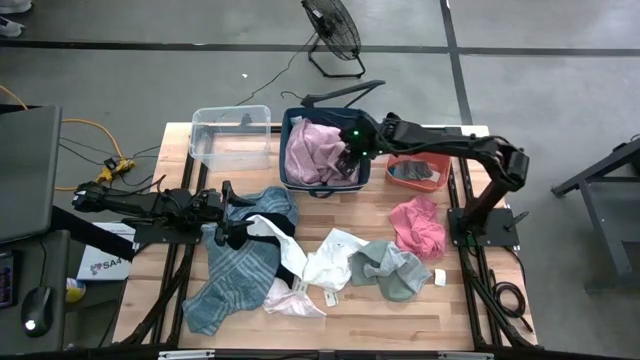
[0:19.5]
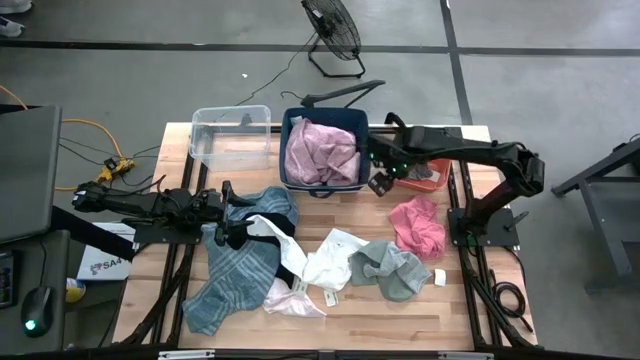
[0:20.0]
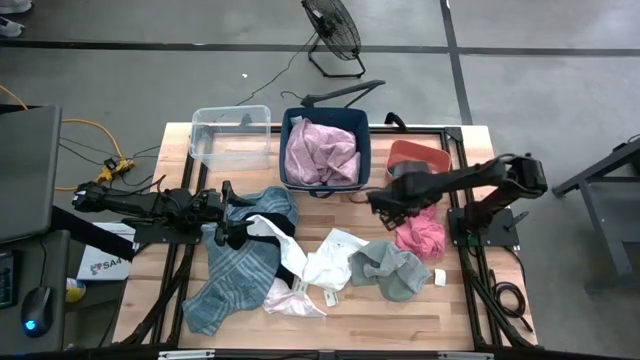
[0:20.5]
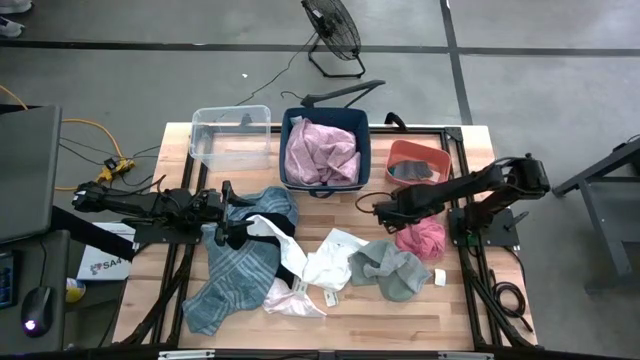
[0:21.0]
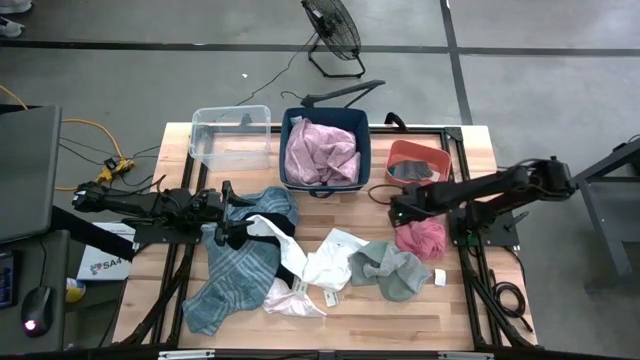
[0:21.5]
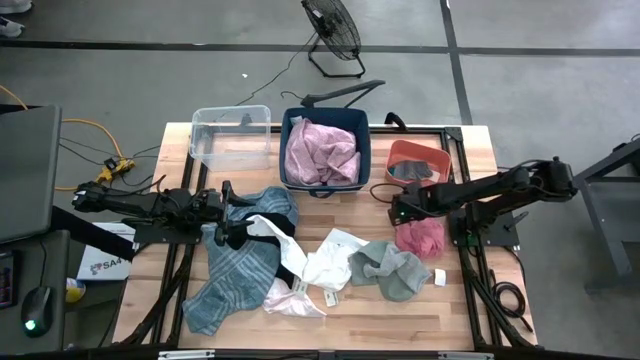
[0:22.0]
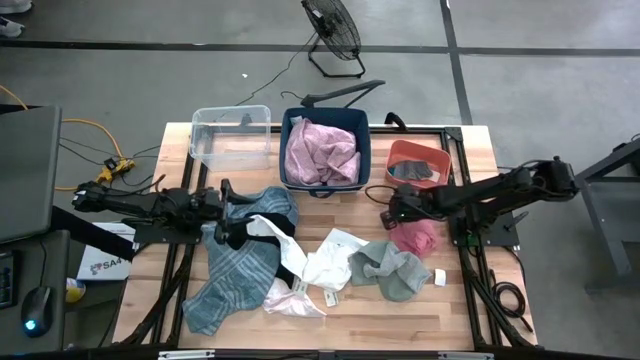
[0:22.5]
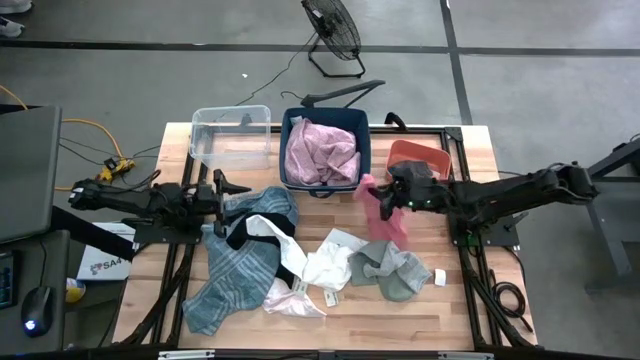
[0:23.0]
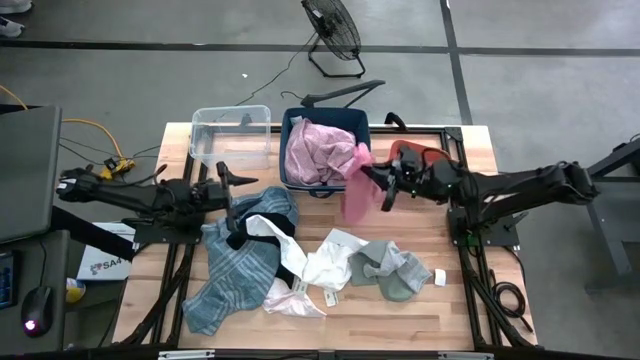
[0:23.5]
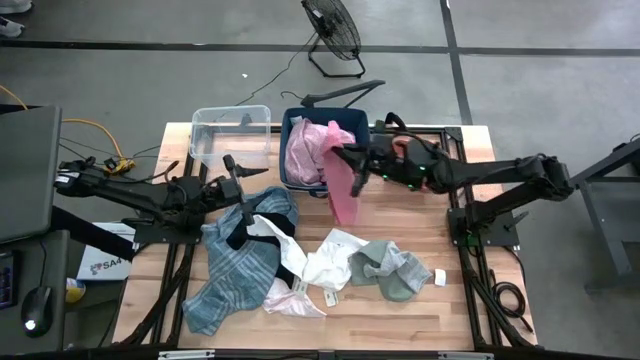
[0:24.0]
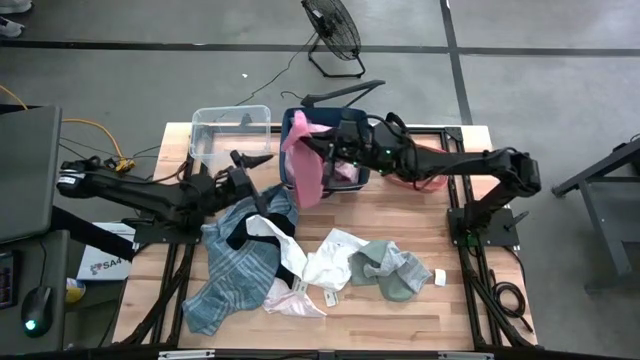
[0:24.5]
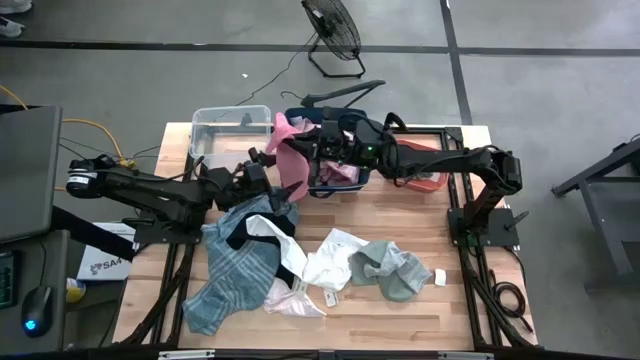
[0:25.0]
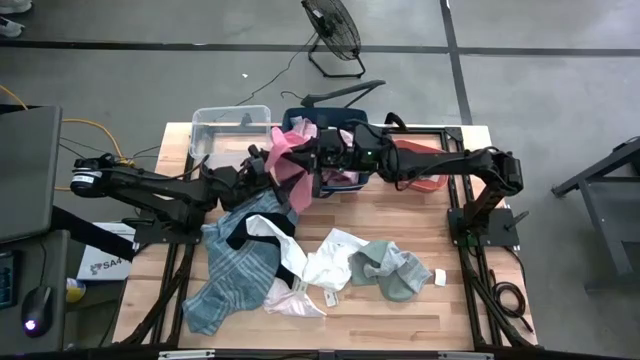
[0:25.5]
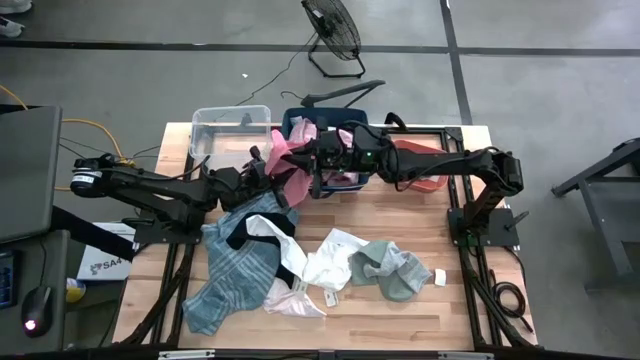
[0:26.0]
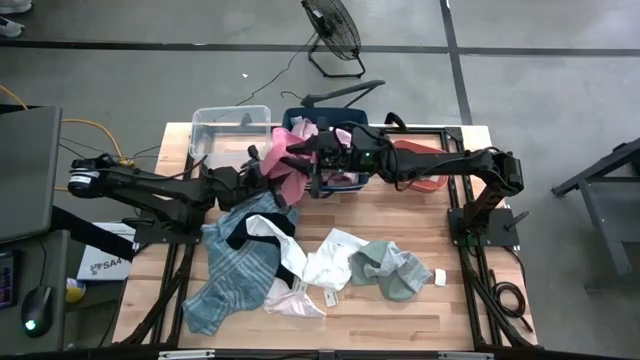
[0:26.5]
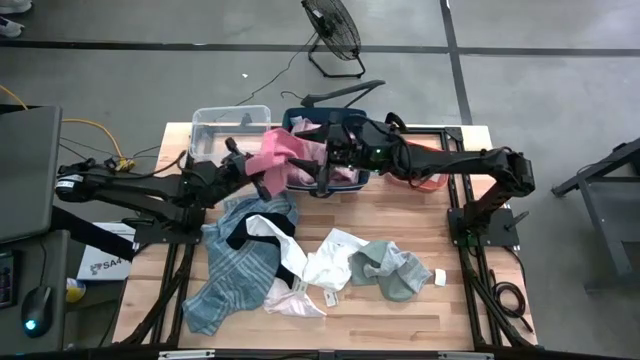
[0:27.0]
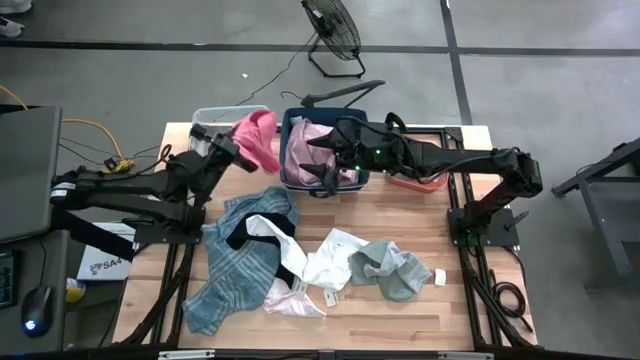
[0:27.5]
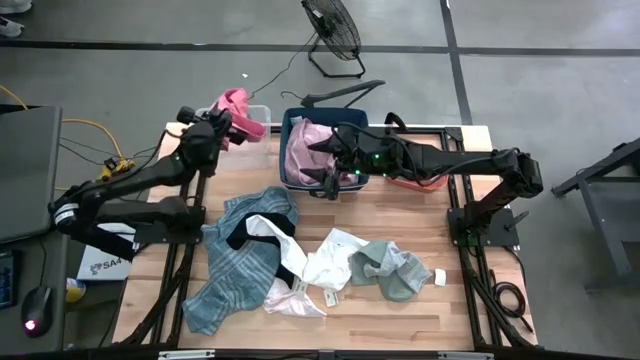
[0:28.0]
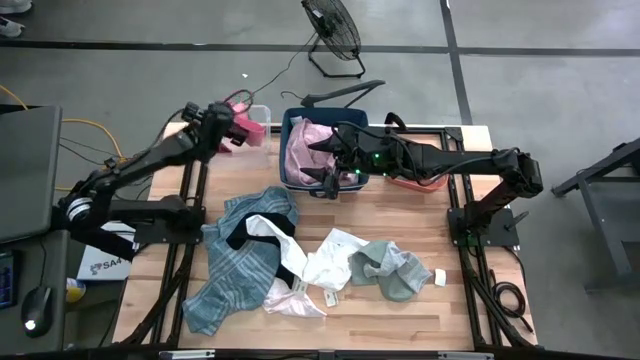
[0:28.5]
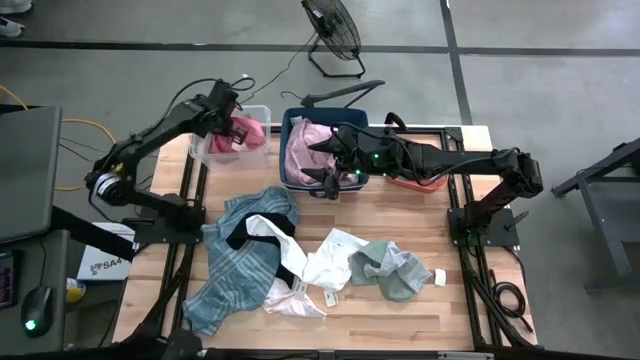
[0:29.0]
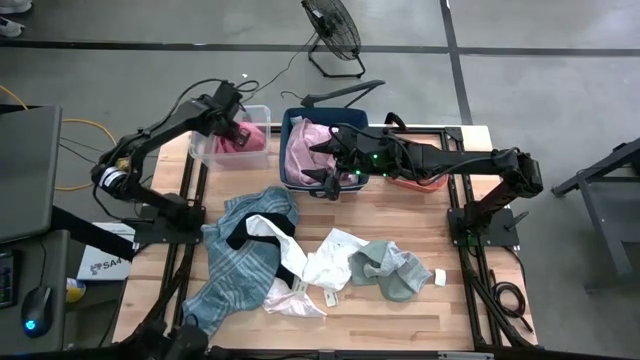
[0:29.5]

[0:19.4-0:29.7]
Task: Pick & Place Cloths
Put the pink underwear into the transparent bin

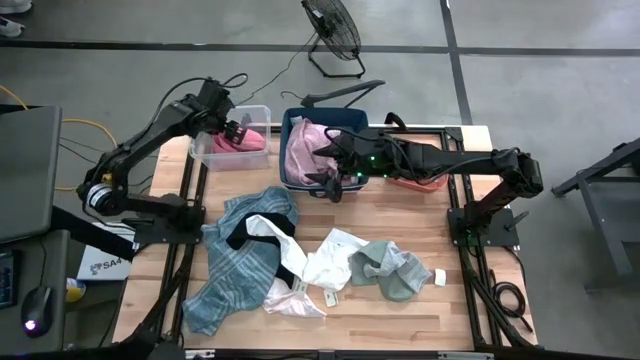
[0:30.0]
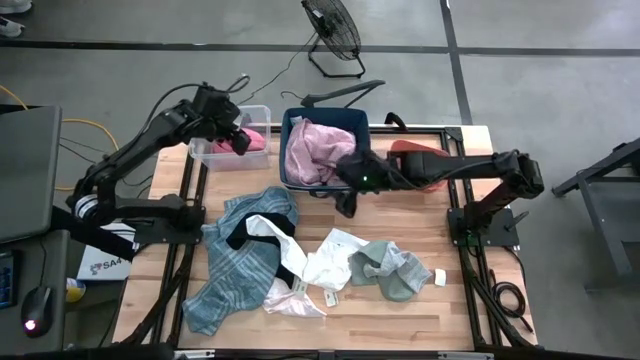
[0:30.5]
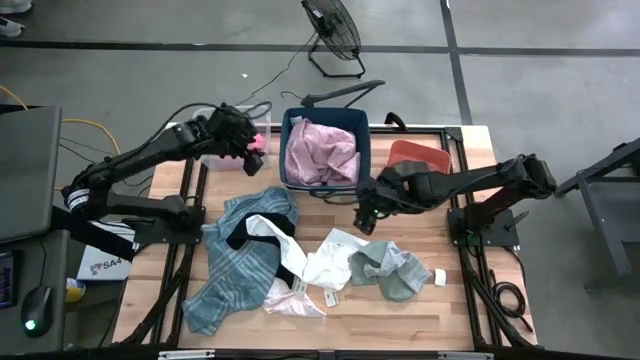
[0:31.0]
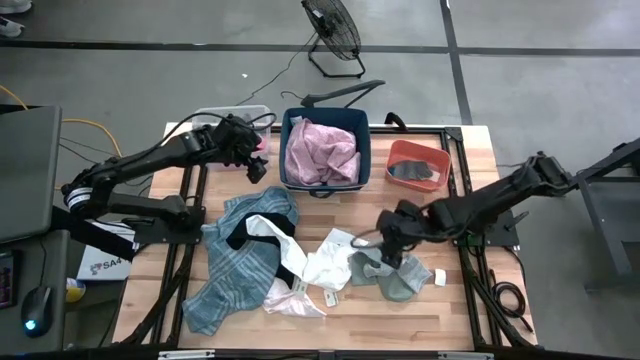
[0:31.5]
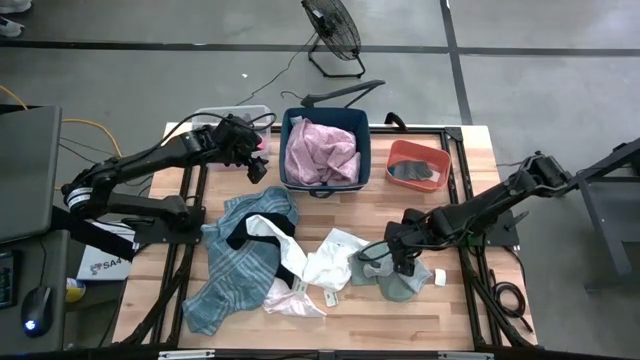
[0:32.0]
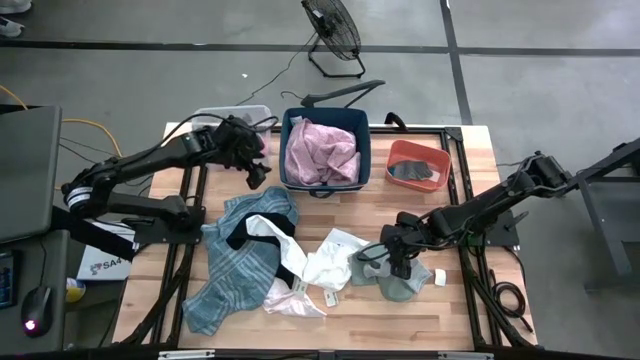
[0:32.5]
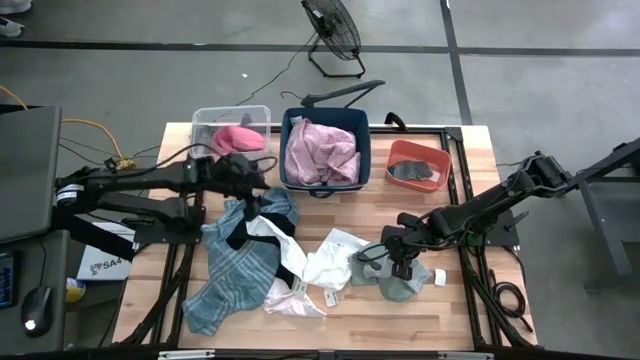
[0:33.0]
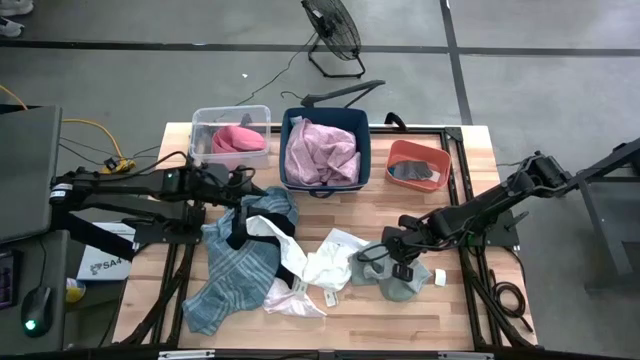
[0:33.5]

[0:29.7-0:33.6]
Put the light gray sock into the orange bin

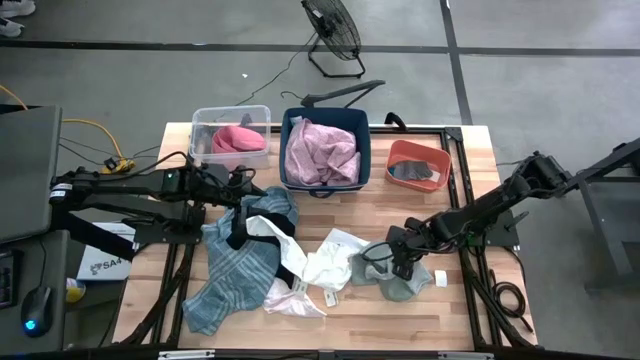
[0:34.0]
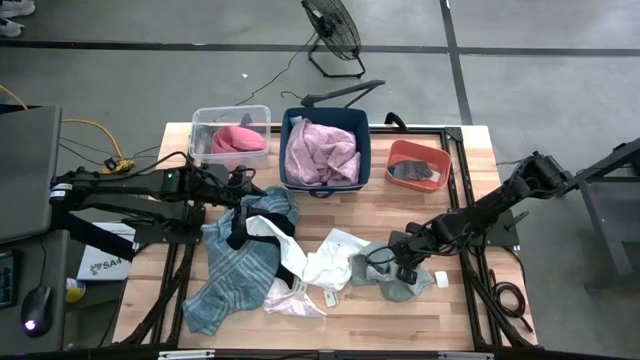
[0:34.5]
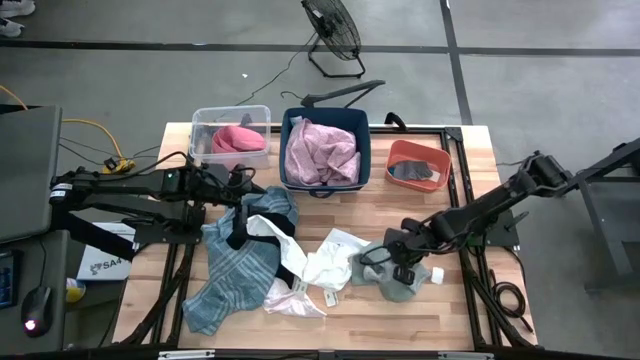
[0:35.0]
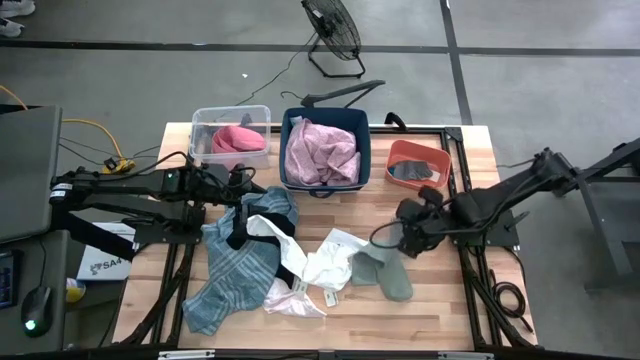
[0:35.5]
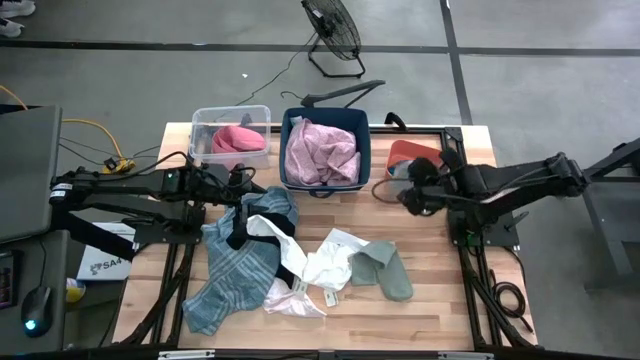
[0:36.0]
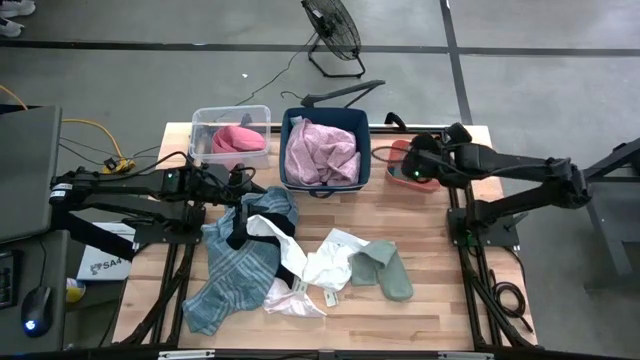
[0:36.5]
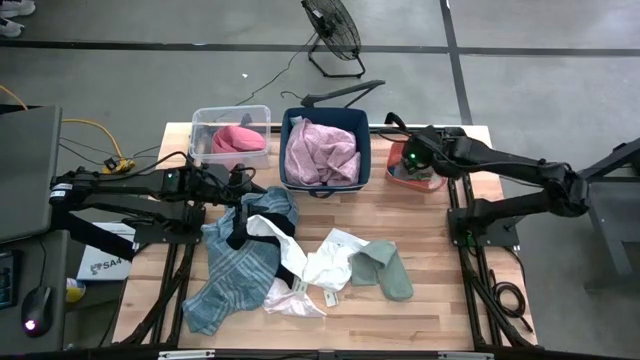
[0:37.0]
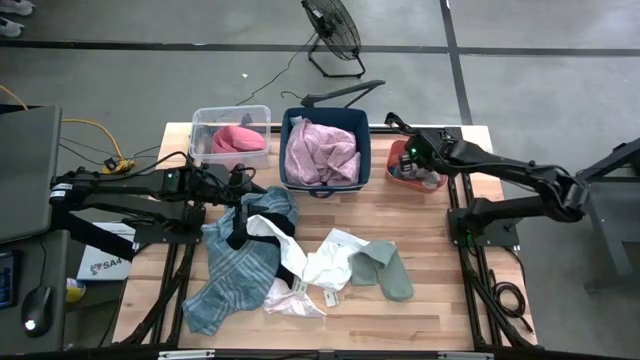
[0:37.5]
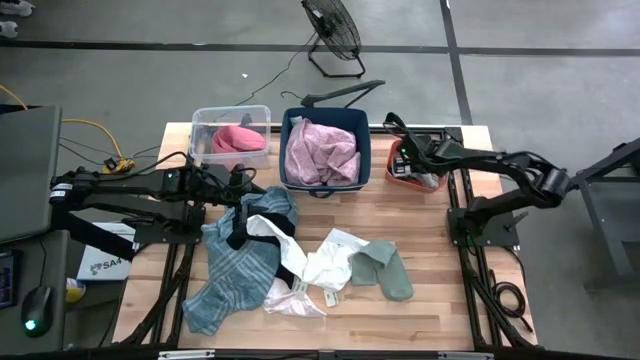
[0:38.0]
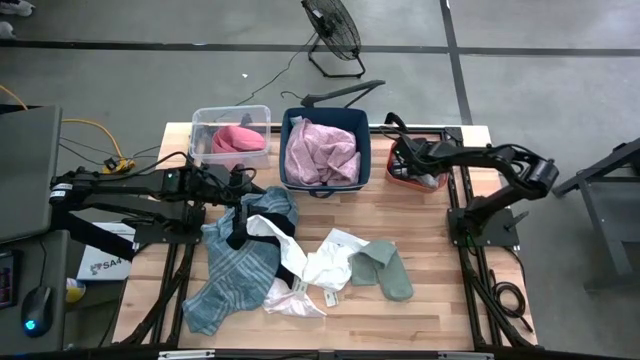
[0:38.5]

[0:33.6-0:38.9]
Put the light gray sock into the orange bin

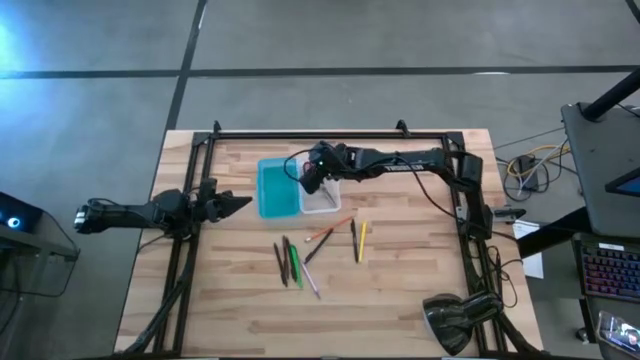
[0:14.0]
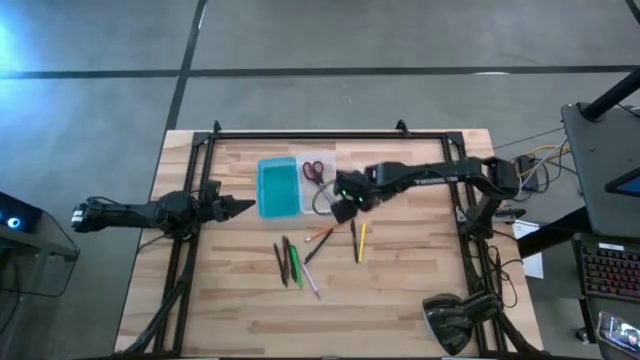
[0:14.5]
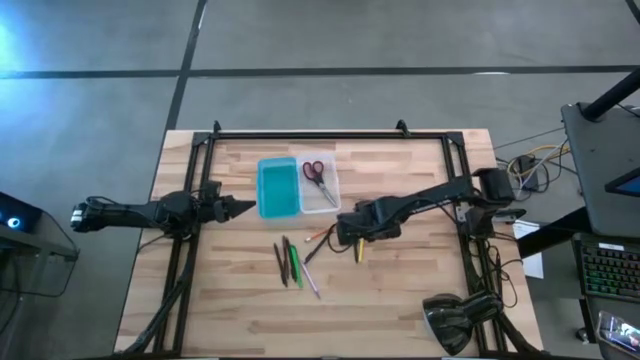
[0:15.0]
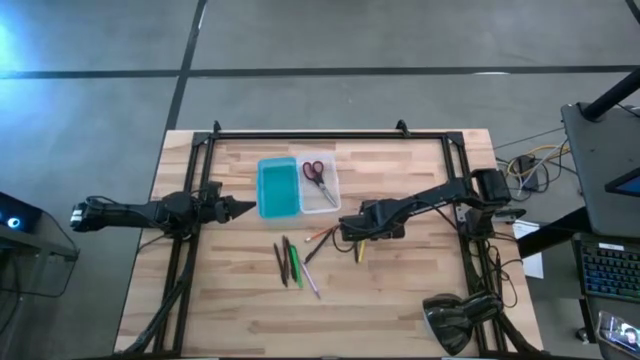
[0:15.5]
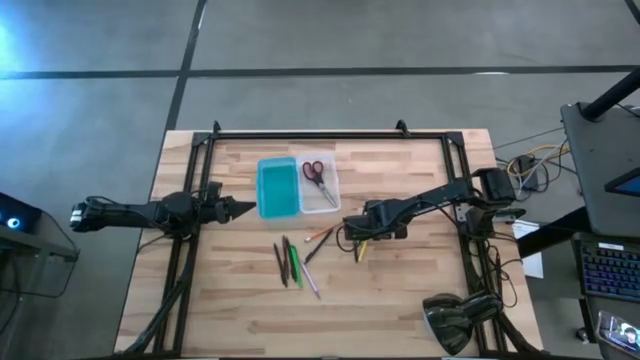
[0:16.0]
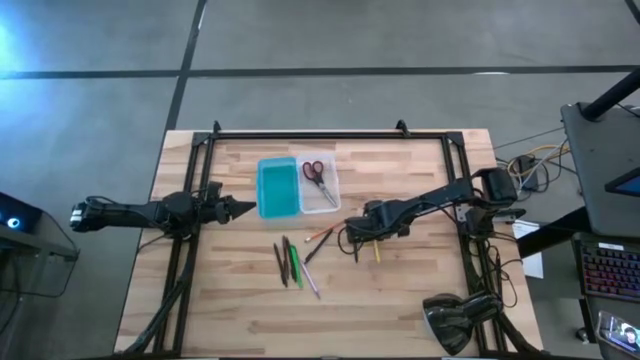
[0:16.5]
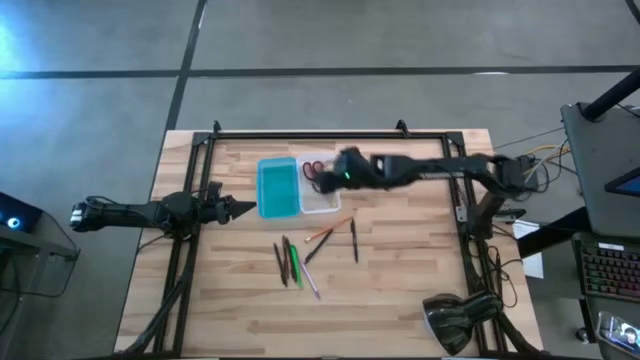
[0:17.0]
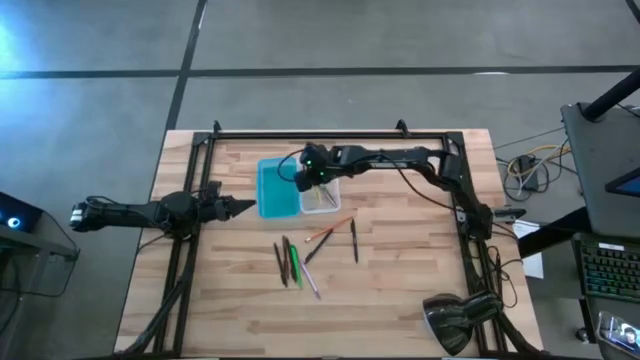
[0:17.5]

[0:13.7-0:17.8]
Task: Pick & place school supplies into a supply box
Put the yellow pen into the pencil box
